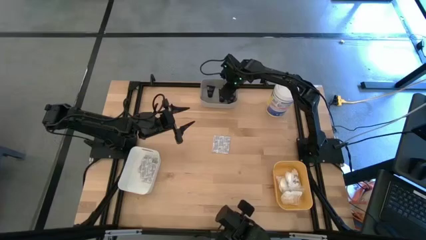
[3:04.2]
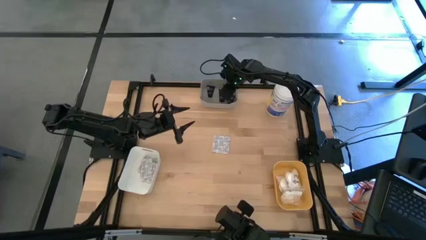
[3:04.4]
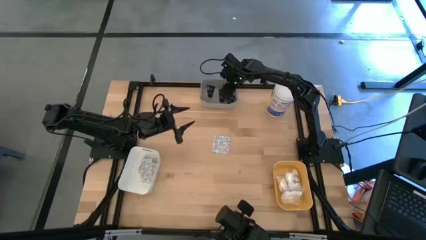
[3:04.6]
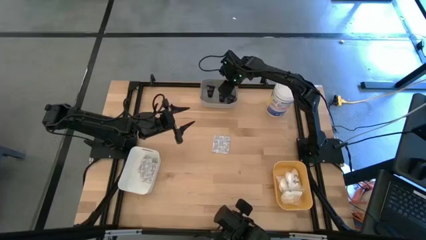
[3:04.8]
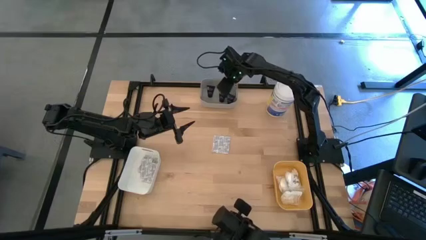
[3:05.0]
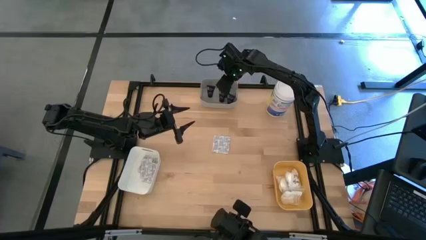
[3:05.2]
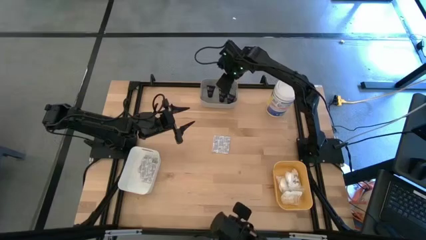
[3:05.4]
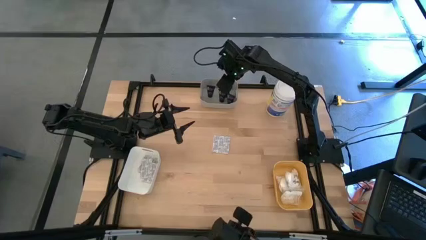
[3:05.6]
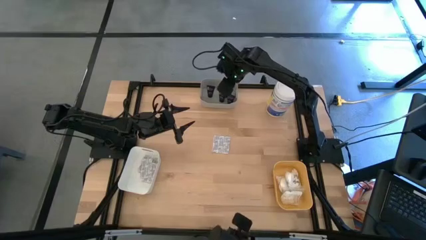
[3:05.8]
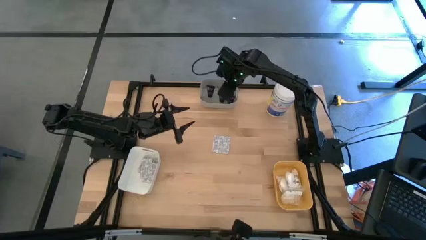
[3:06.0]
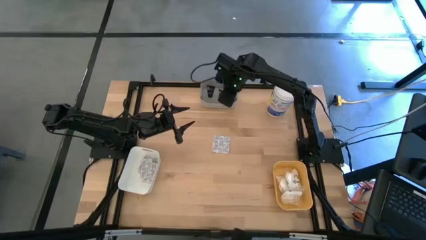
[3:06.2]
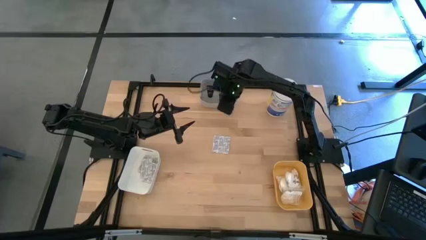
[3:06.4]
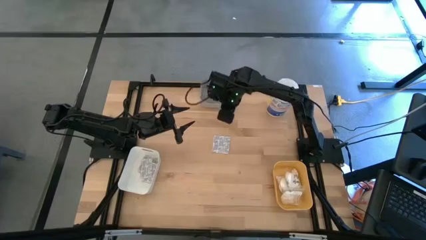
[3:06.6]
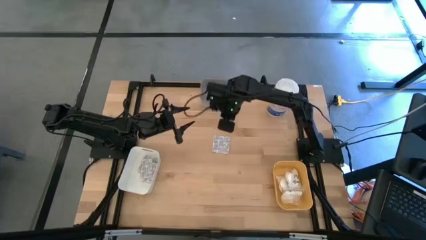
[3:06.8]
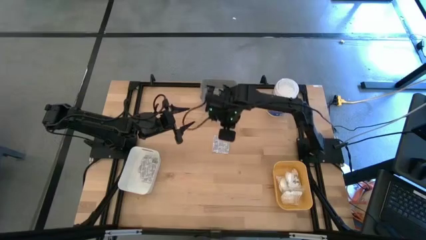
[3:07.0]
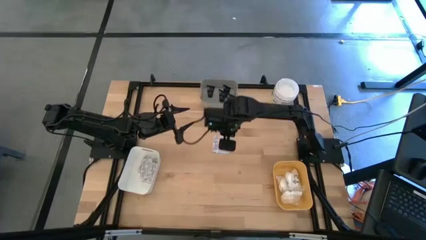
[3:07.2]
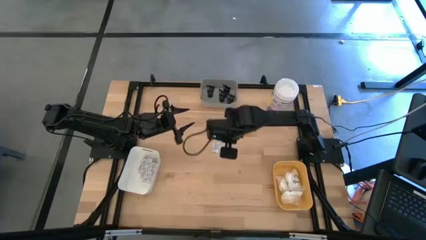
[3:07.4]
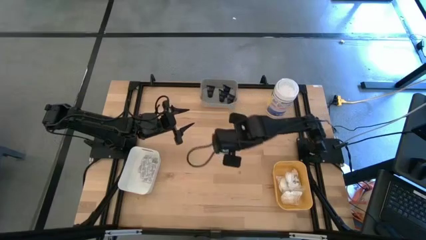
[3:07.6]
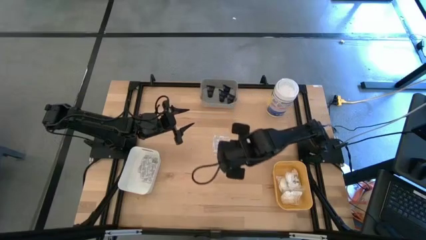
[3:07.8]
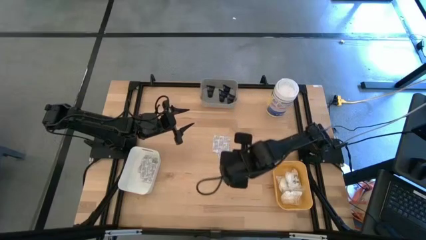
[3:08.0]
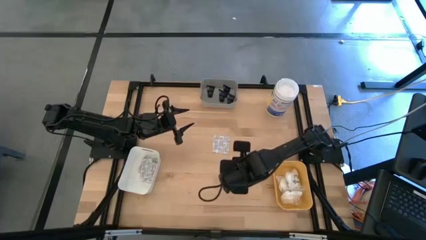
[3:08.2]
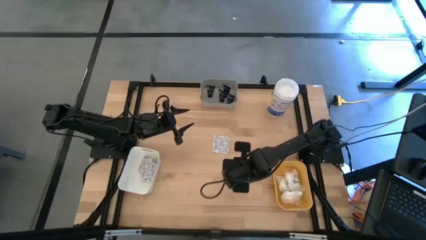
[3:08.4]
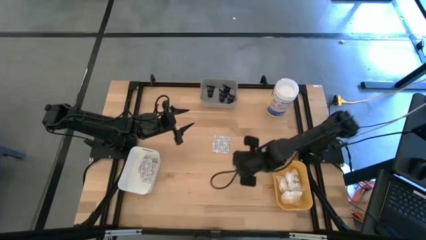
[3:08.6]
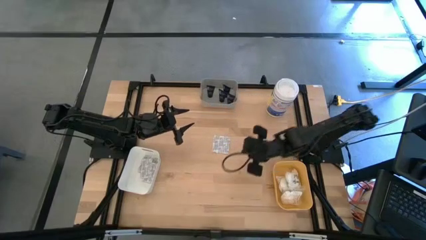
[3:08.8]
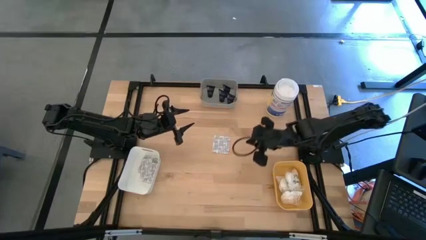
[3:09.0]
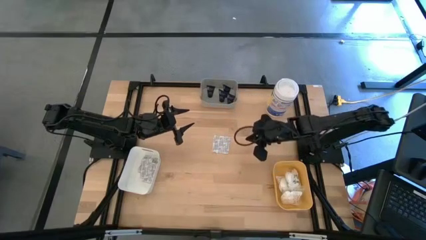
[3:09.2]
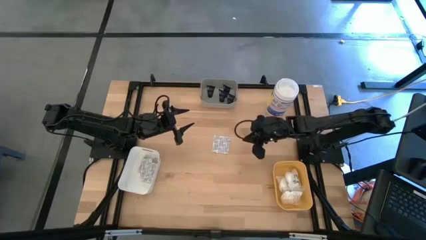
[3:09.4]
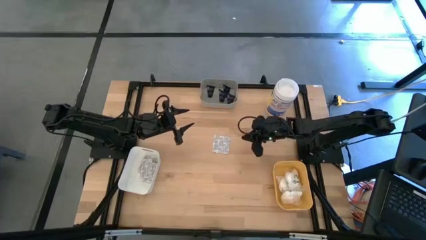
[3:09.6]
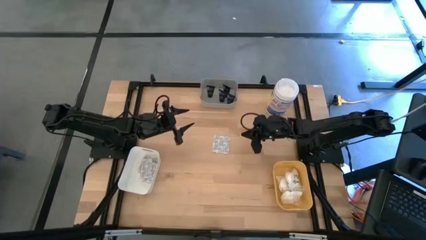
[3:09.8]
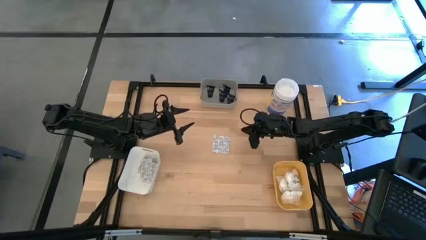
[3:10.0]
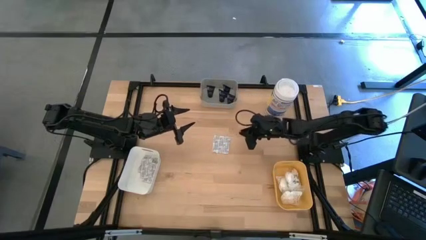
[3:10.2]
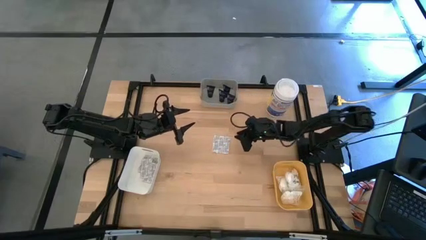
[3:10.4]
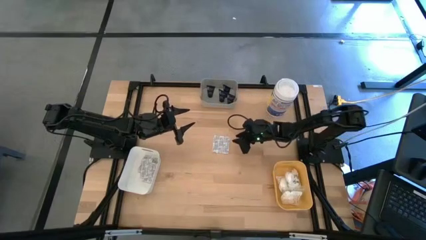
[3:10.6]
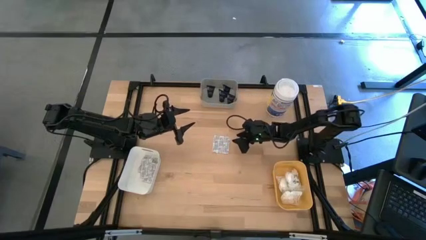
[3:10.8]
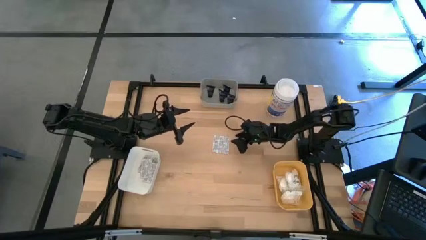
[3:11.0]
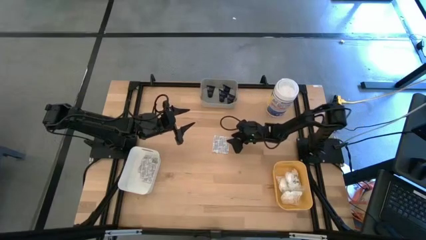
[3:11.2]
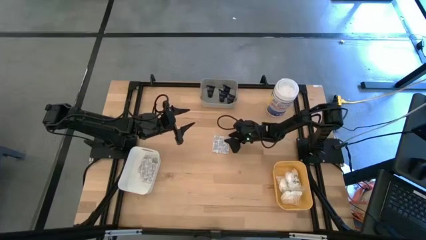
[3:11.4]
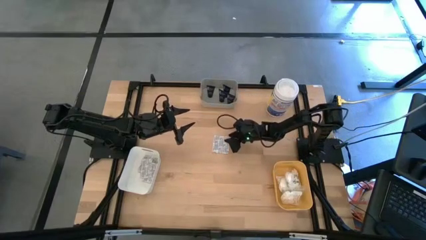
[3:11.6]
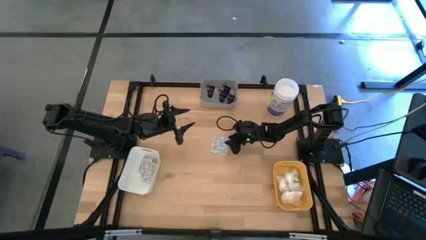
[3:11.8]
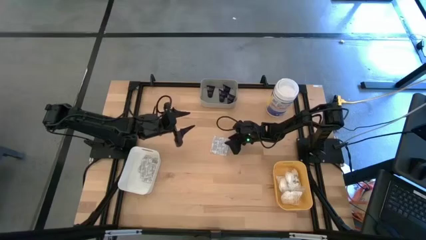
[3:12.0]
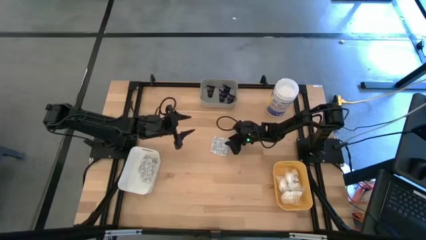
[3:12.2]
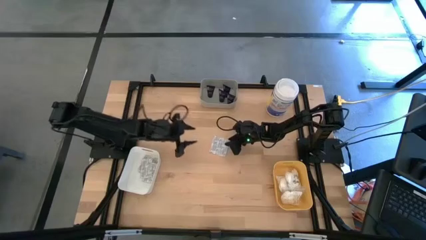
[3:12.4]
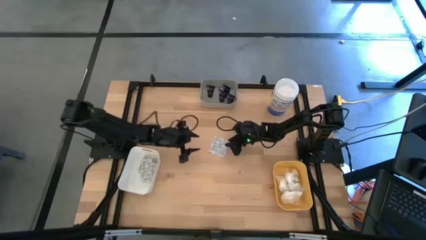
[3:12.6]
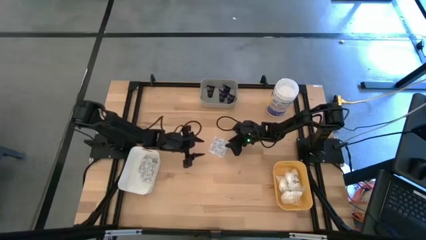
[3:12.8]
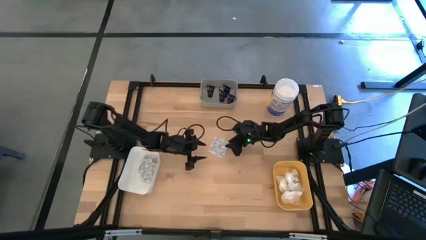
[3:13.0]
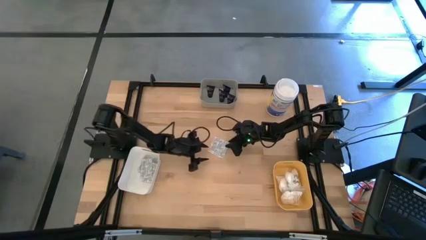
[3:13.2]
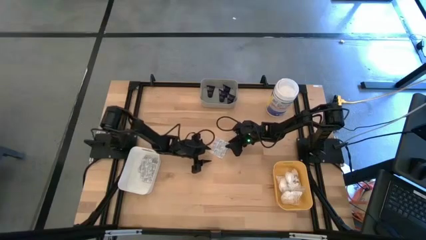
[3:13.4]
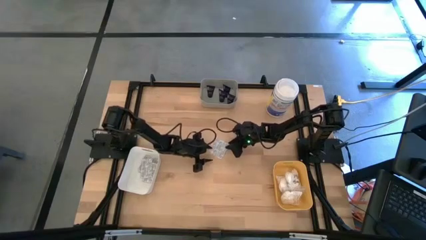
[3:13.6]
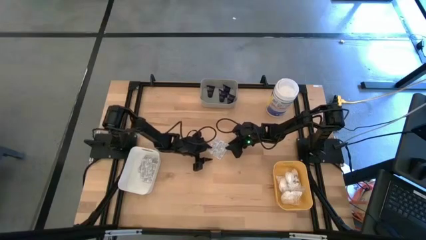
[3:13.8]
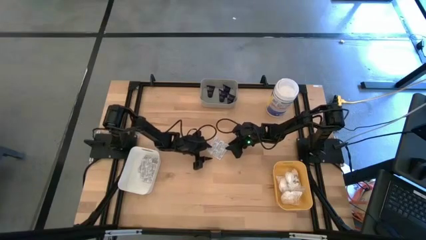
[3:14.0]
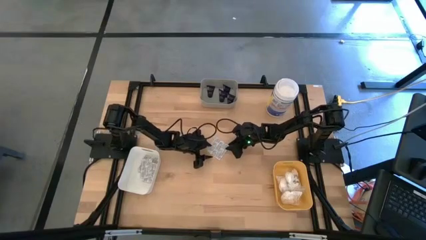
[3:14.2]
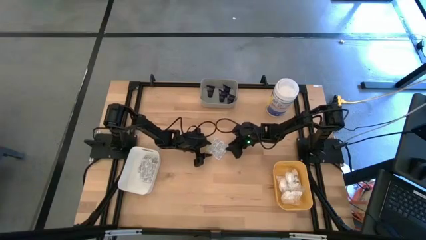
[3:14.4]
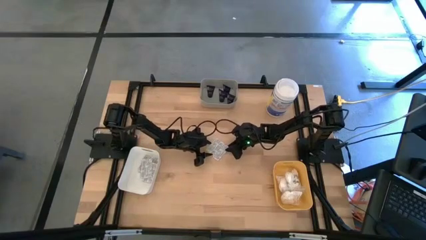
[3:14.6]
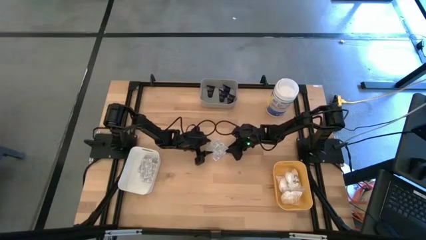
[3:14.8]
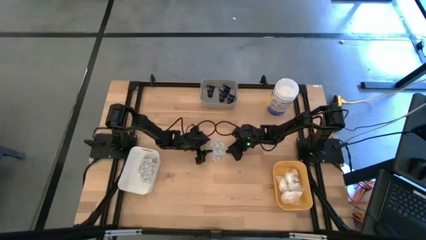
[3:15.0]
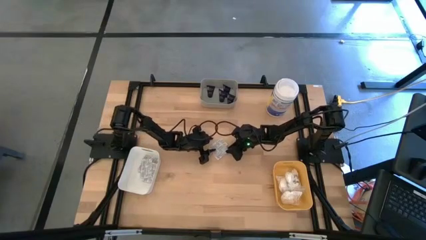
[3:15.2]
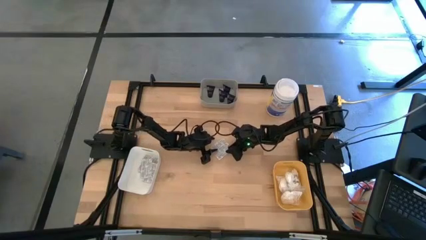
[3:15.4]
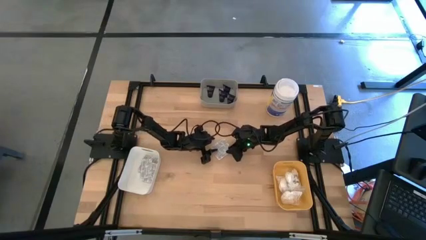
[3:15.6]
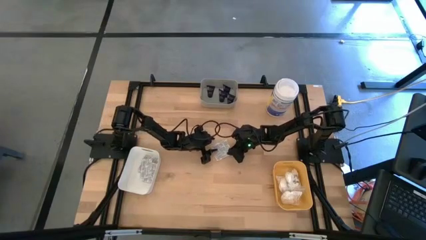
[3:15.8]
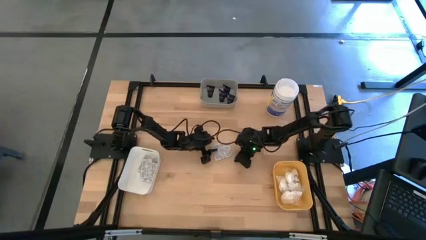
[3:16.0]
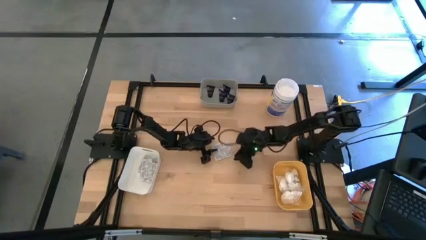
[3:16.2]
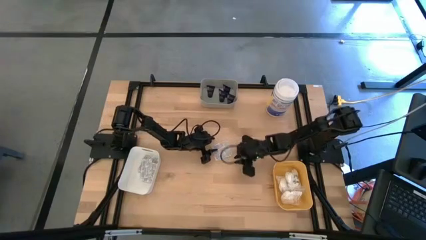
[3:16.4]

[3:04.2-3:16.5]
Task: Pick & Place Travel size toiletries
Put the bandage into the white bin

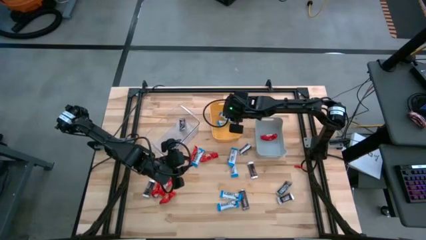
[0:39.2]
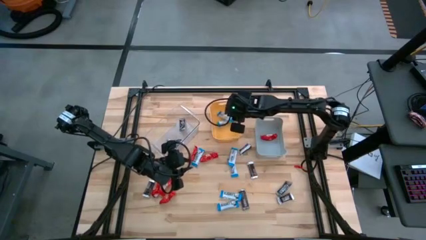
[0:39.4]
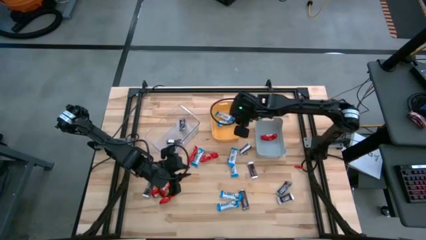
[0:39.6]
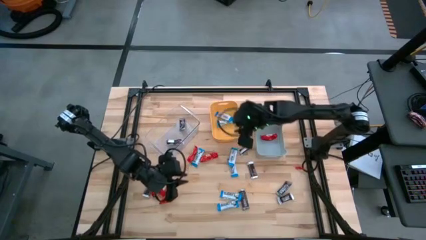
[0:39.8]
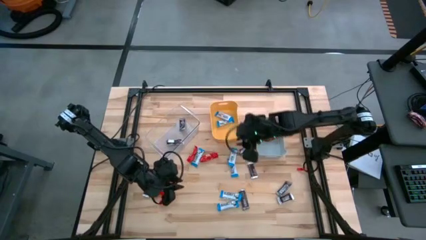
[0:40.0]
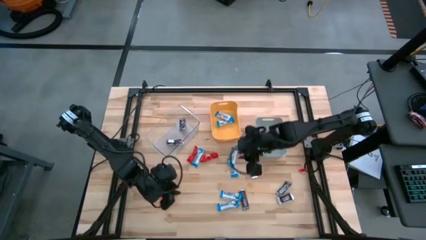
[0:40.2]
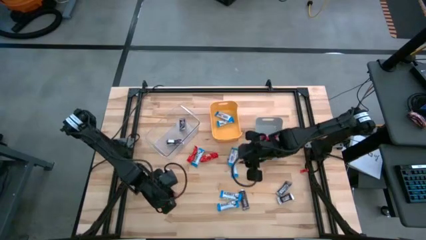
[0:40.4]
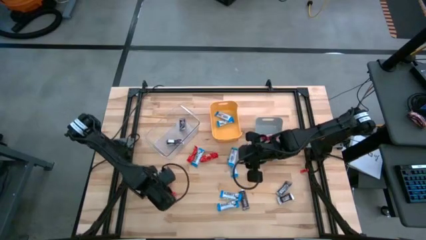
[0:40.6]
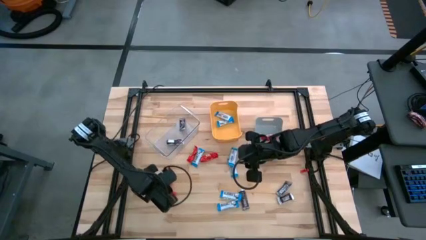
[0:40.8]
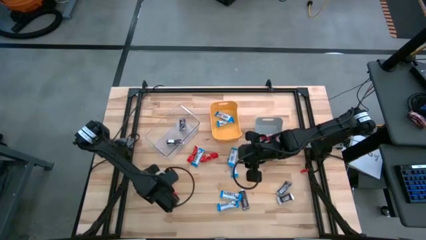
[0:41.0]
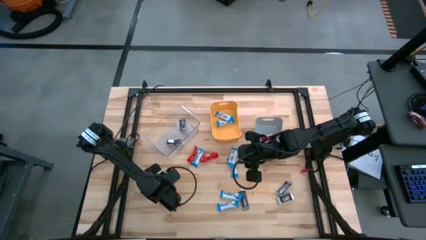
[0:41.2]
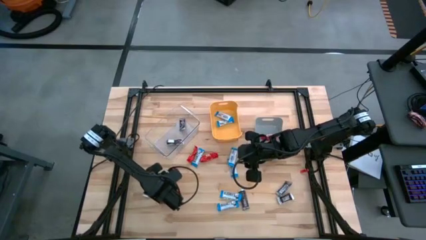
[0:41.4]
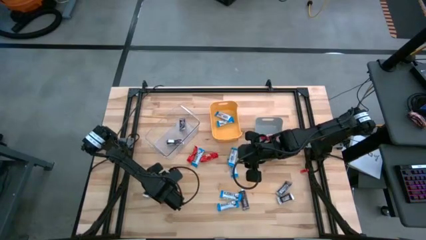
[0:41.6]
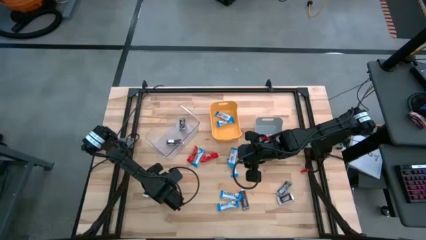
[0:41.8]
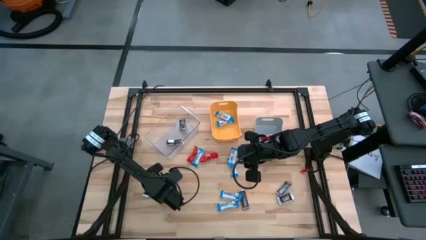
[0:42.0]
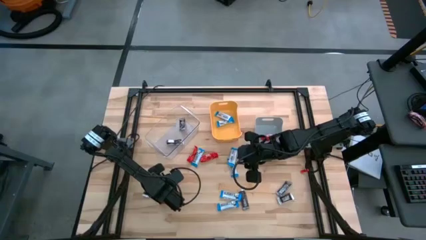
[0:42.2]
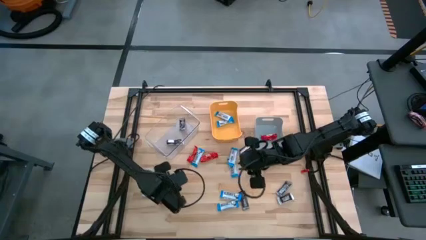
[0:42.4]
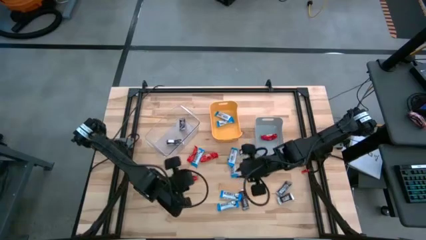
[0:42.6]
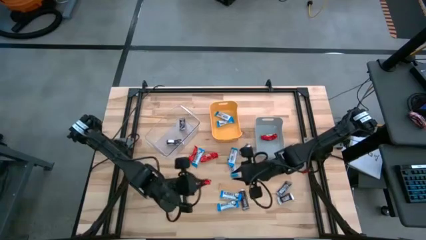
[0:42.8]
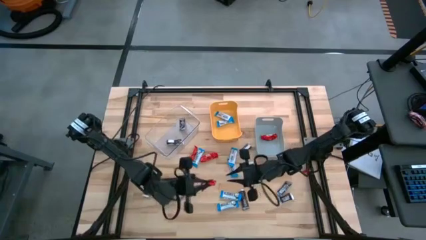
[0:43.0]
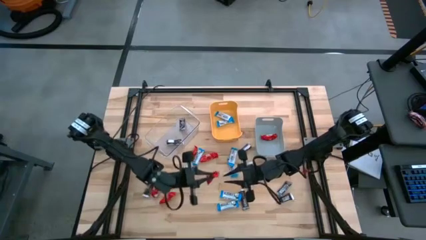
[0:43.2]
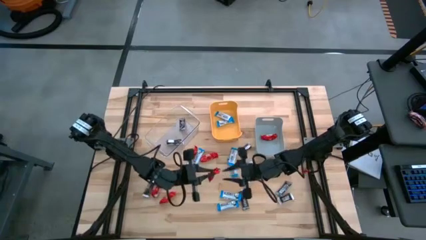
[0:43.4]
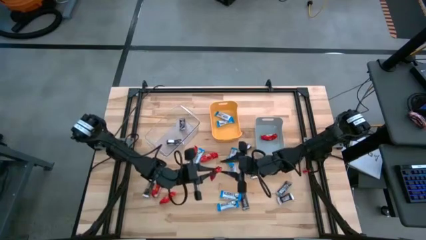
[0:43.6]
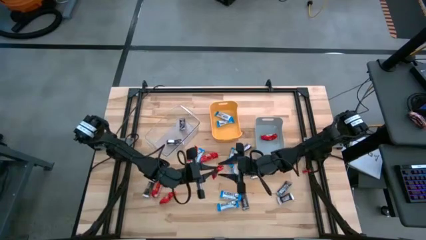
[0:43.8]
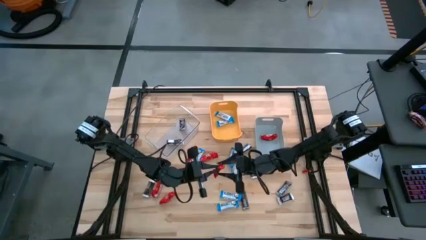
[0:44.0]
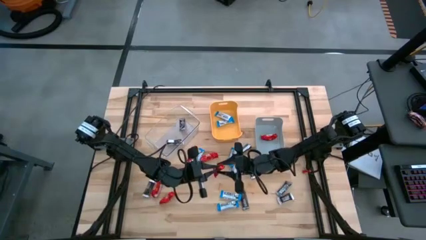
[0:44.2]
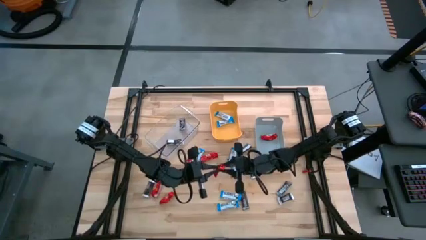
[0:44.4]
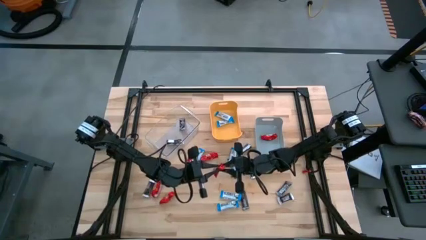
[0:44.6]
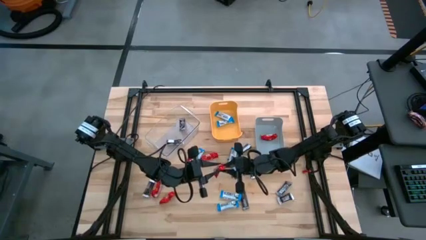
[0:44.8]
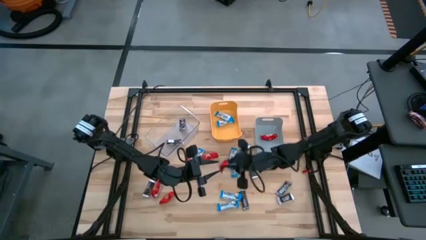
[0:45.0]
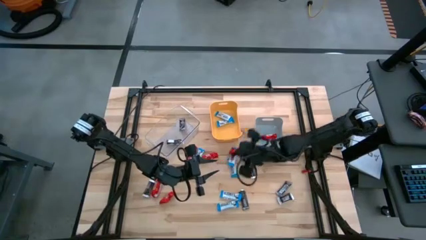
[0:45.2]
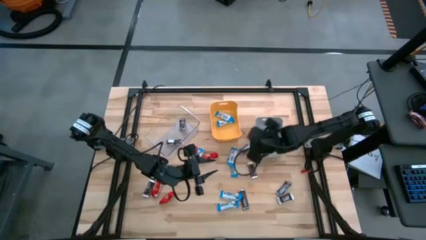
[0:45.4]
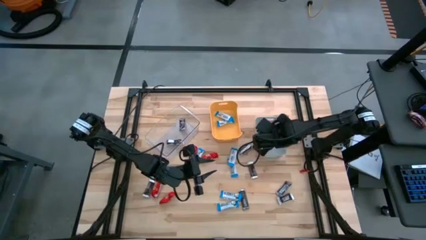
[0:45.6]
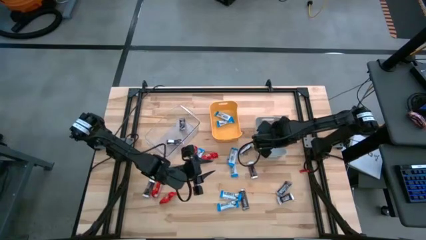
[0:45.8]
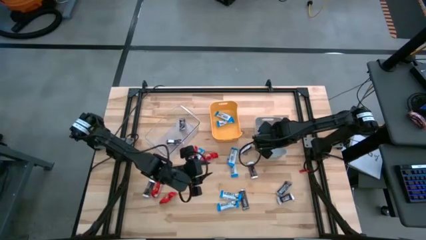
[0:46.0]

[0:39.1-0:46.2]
Task: Organize candy in baskets
Put the red chocolate into the gray bin
